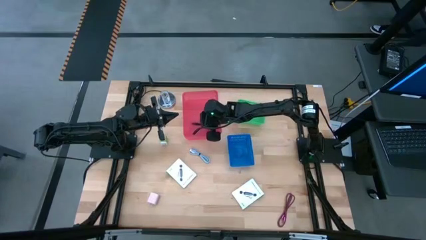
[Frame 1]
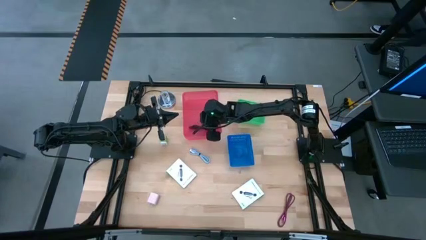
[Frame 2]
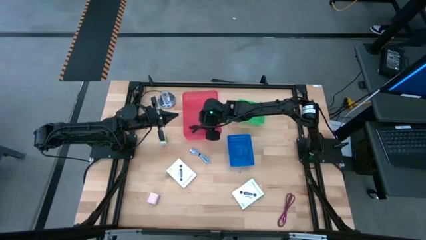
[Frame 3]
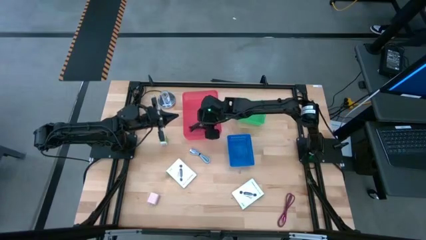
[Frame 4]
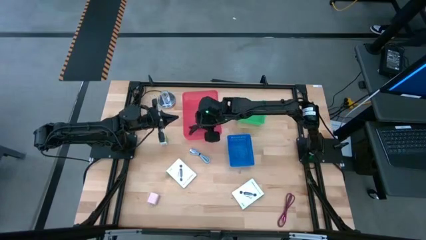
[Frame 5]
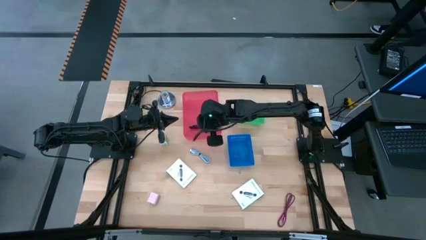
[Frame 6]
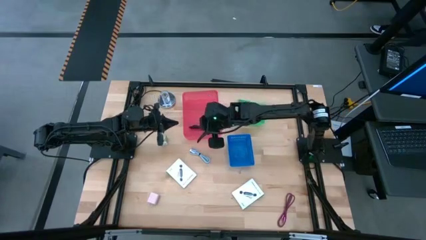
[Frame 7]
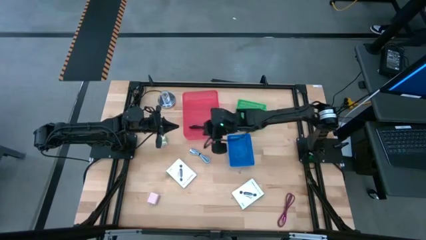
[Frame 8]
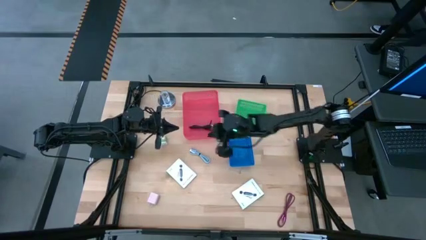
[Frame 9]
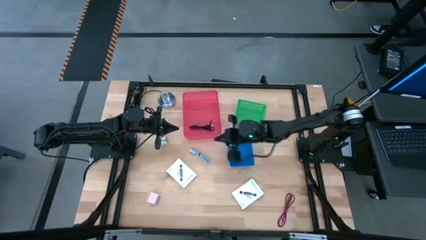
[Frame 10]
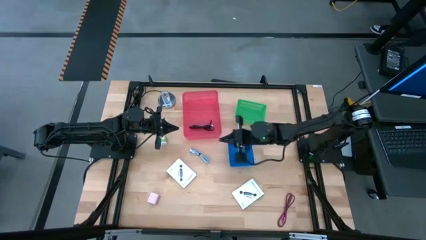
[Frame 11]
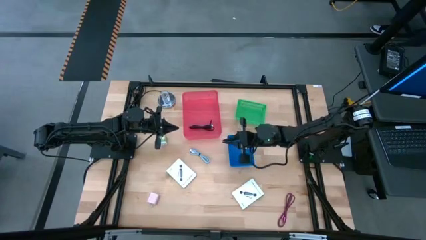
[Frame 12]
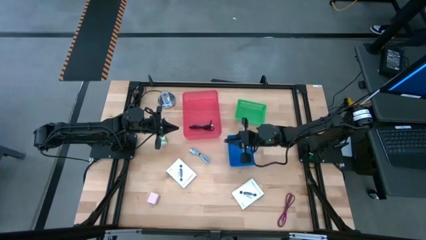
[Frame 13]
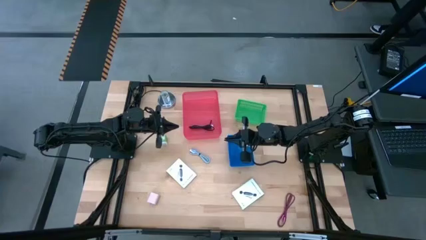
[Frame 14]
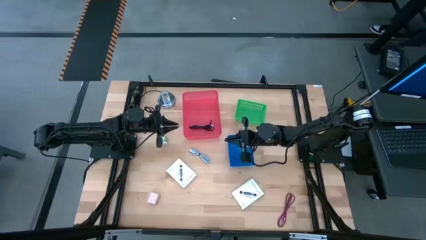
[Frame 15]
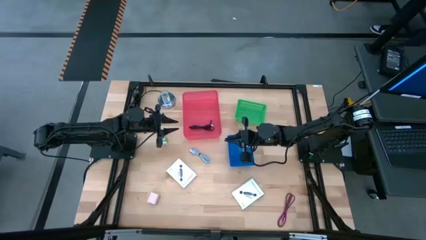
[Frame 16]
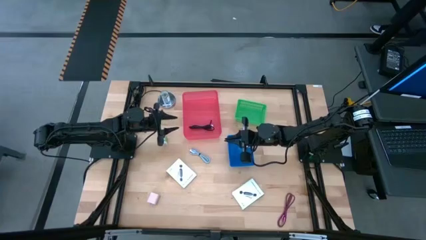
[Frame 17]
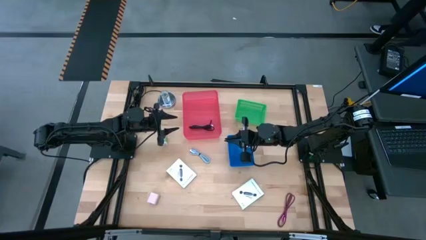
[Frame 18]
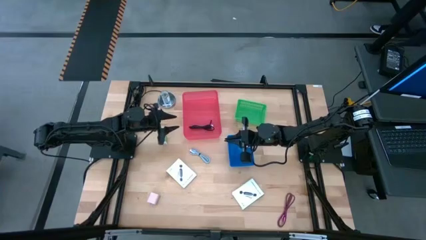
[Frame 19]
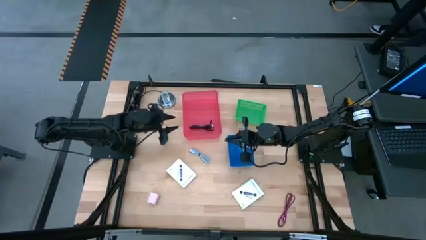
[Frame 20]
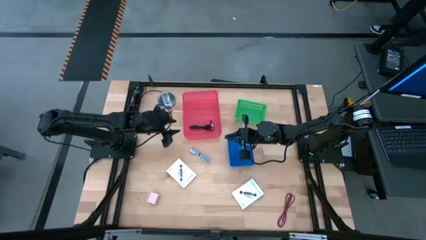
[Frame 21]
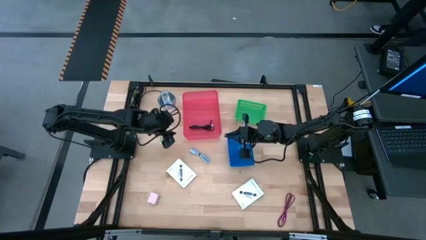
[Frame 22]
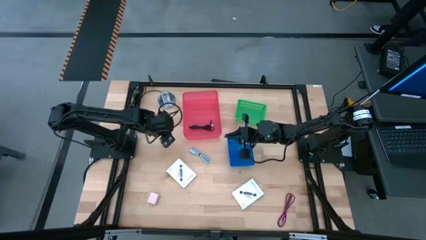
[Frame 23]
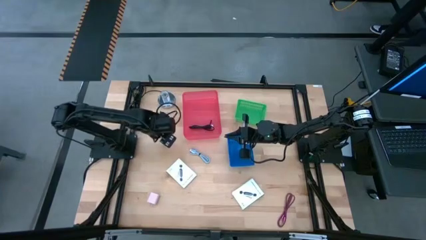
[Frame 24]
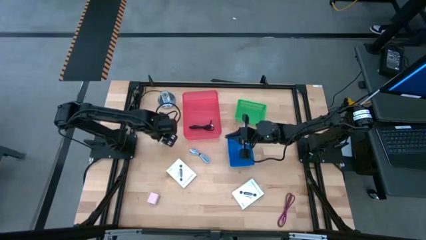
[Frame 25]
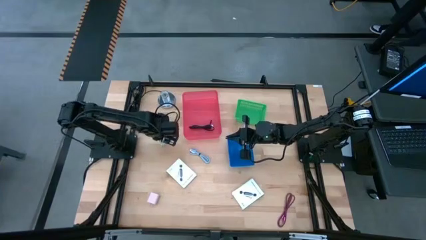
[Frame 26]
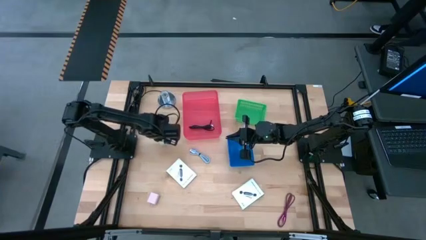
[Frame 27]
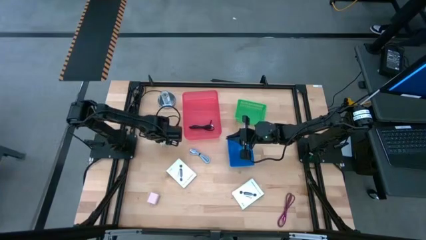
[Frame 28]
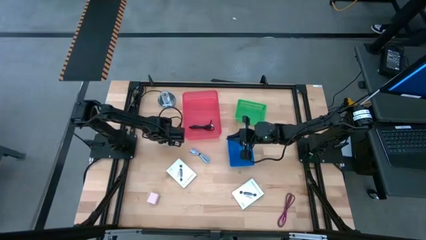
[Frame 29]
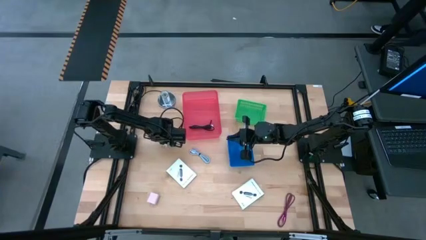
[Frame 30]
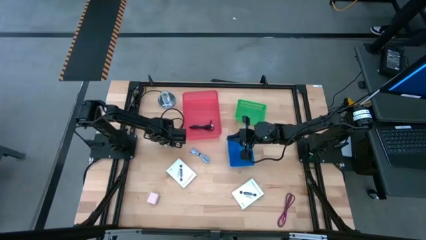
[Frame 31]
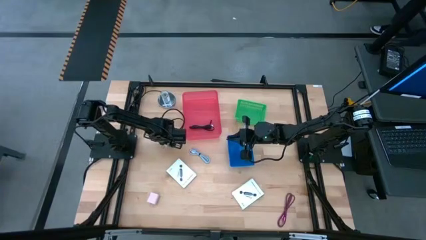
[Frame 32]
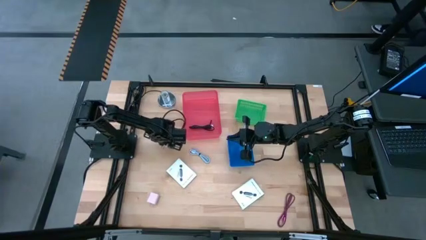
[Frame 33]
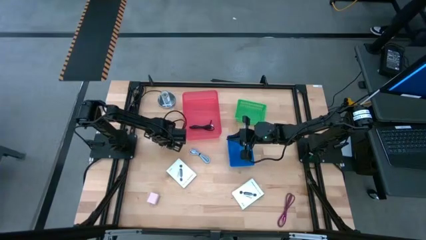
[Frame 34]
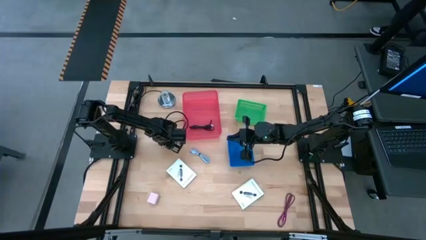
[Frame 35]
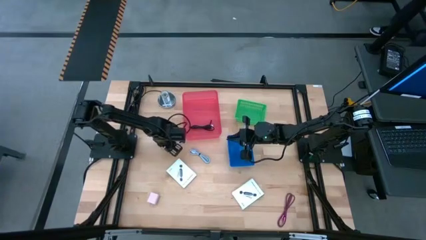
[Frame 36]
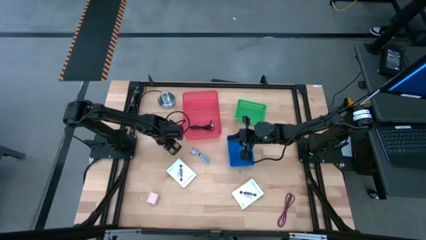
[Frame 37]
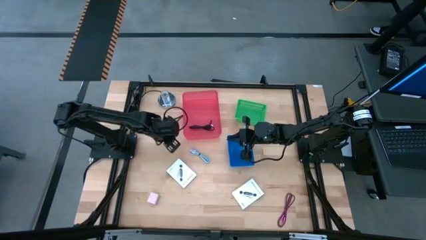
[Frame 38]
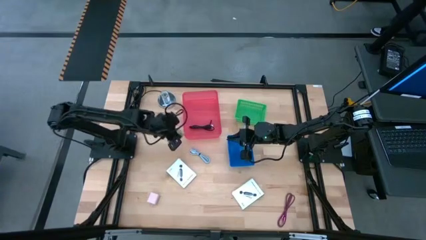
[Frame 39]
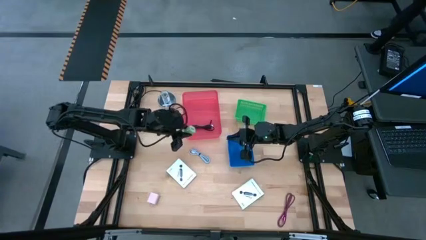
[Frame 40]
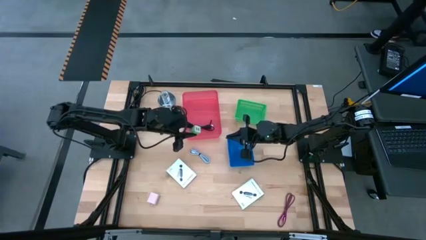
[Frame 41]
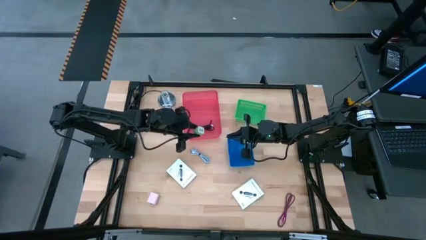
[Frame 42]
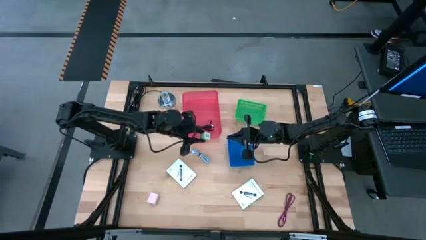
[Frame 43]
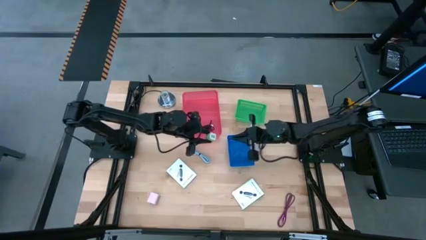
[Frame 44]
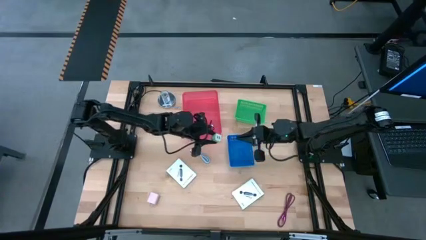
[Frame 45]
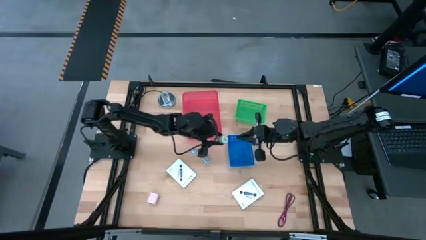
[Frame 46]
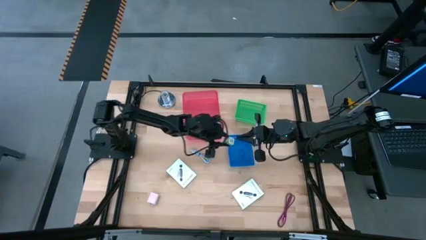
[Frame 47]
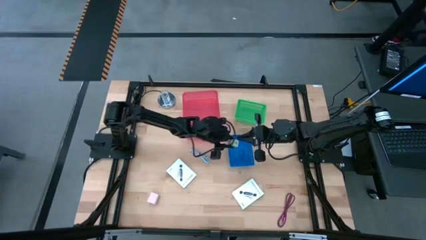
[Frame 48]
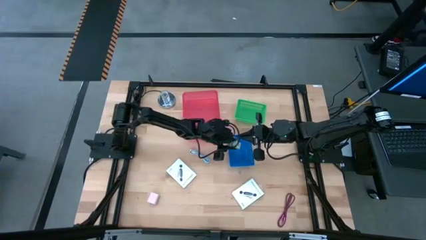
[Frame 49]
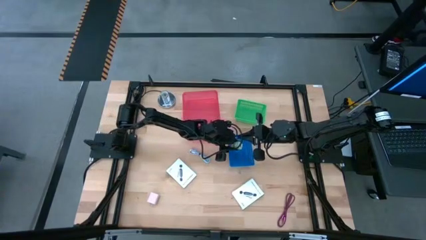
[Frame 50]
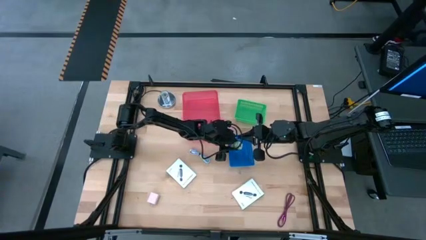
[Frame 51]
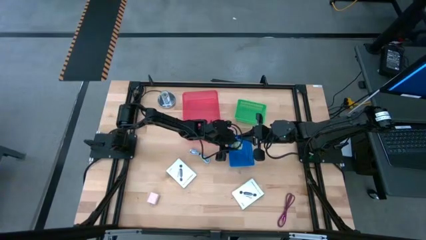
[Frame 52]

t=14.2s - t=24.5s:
Task: Pick and place items into bin
Put the green charger adapter into the blue bin

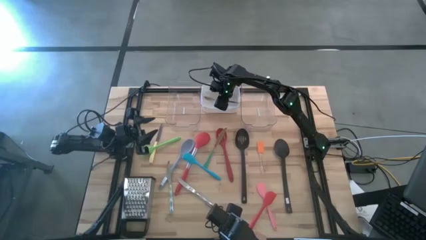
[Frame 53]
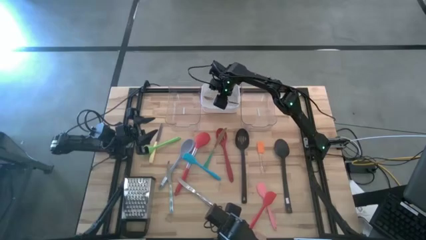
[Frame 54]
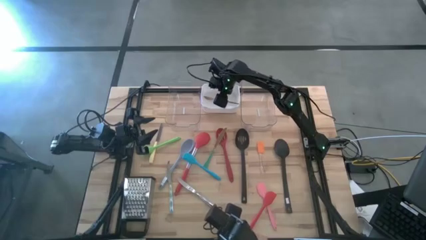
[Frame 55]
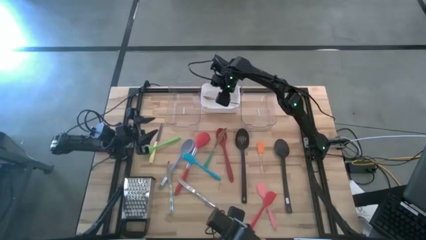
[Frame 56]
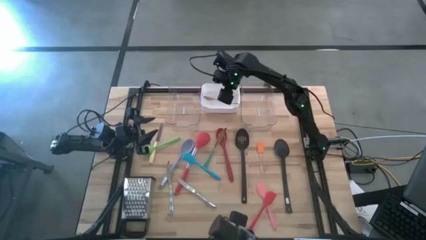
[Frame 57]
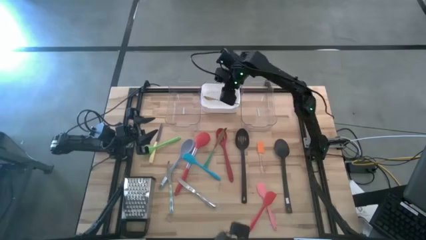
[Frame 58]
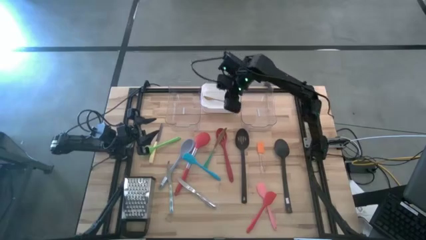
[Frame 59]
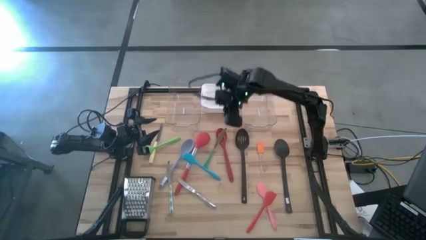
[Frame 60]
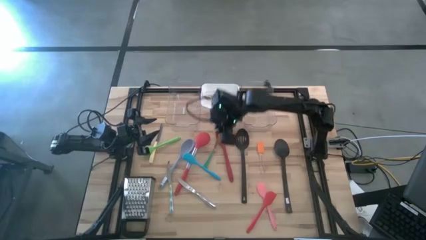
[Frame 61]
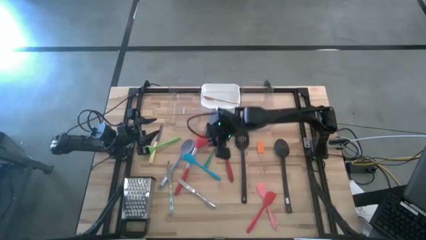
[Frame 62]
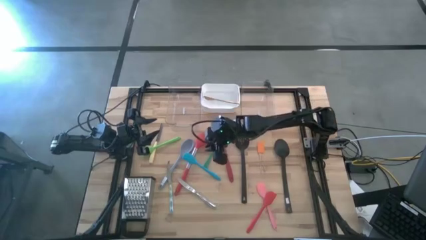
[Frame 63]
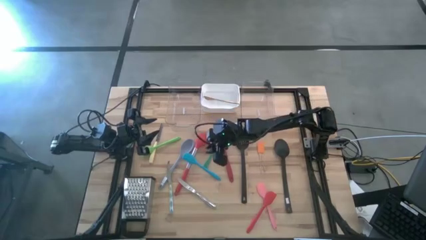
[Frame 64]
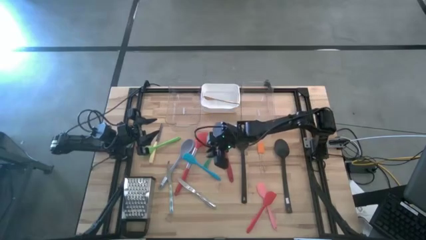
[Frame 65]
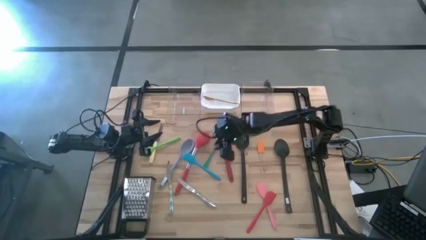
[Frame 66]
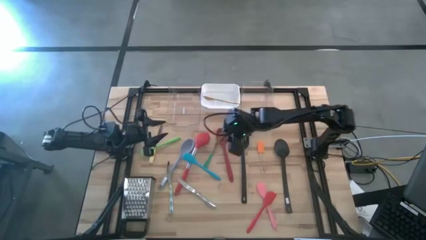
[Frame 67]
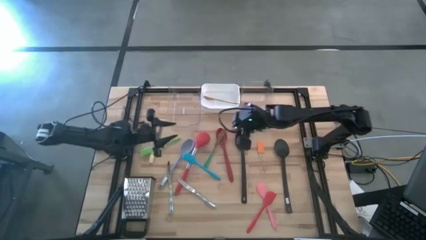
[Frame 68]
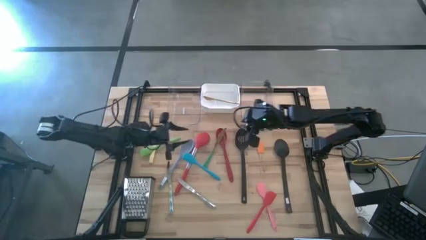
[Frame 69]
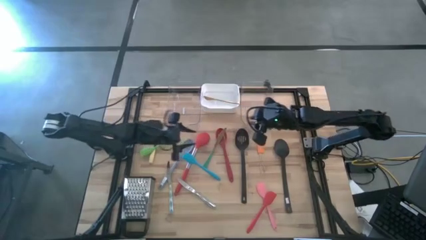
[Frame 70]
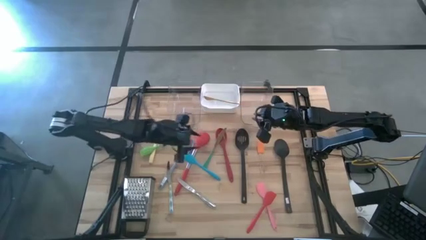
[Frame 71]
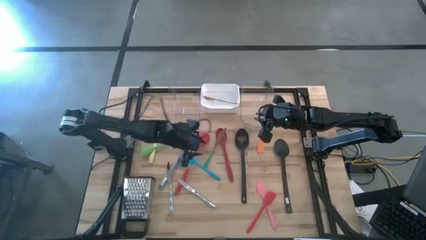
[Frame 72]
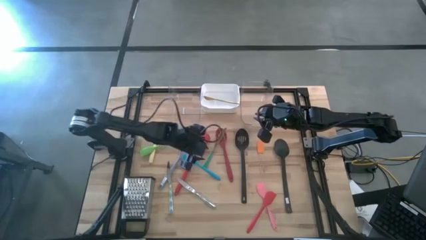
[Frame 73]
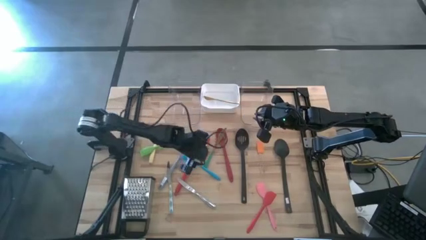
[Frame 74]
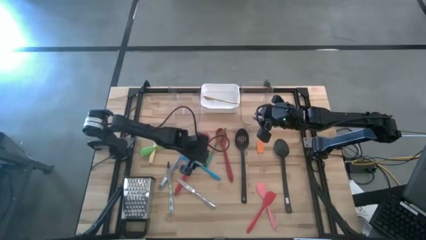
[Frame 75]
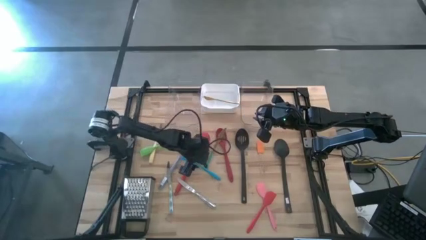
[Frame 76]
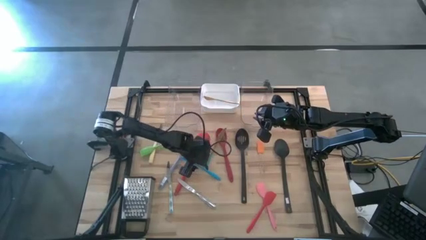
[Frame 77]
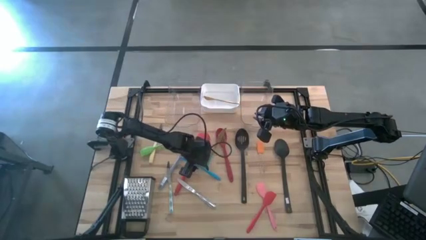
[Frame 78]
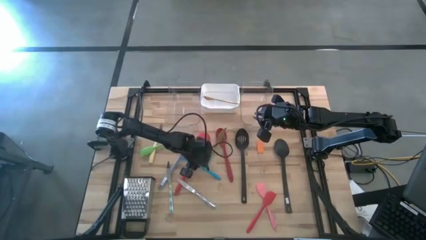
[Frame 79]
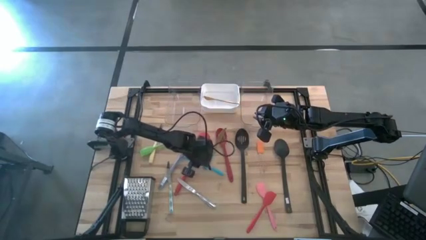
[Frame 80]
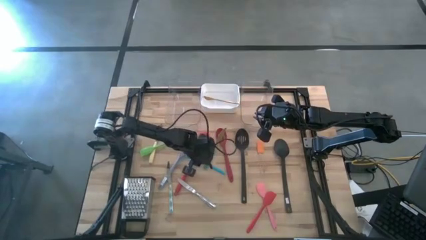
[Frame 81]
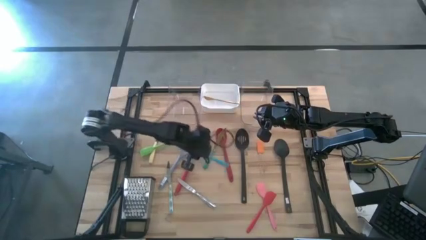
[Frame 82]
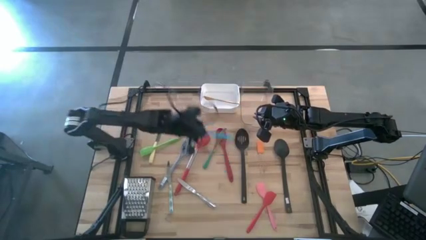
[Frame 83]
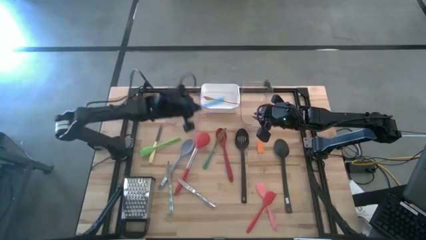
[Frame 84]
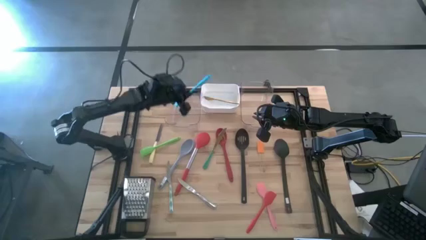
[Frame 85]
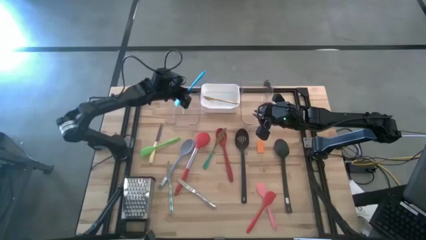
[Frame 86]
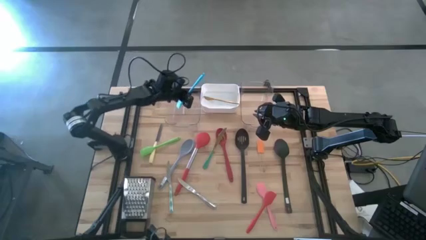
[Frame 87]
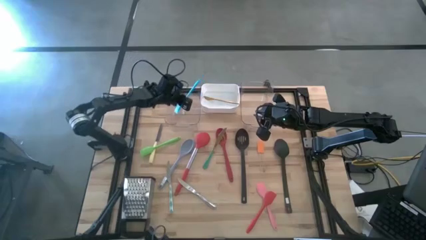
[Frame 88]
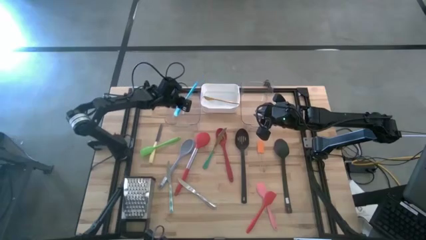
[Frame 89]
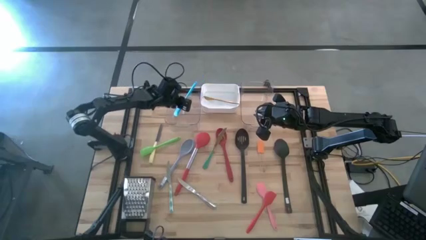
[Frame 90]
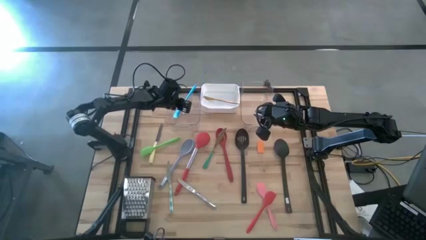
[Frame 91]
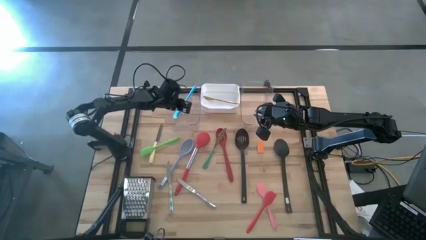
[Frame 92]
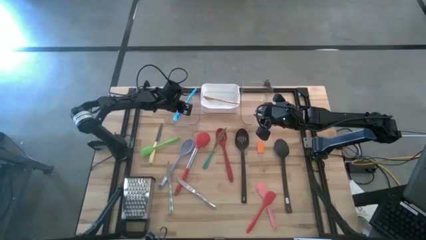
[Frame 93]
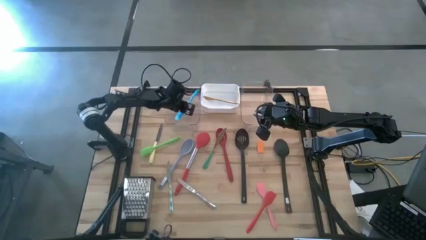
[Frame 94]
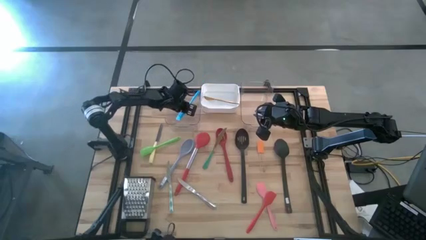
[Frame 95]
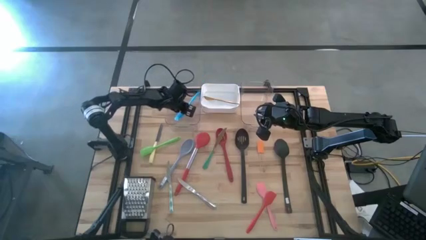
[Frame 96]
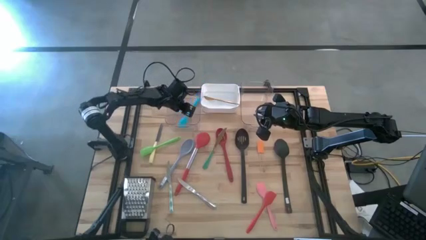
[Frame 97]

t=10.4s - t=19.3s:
Task: Pick & Place Kitchen Items
Put the blue spatula into the left transparent bin
